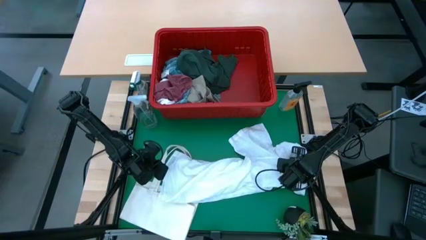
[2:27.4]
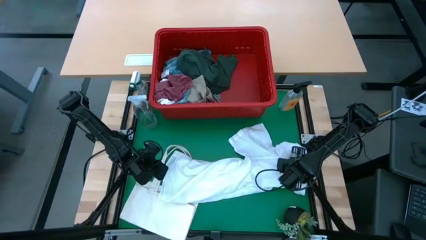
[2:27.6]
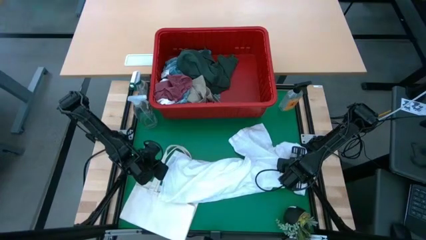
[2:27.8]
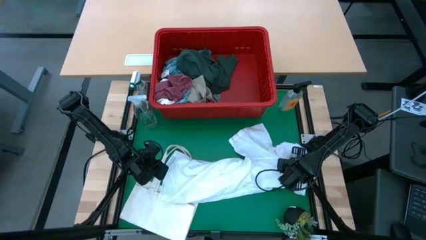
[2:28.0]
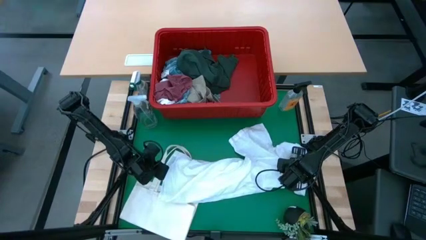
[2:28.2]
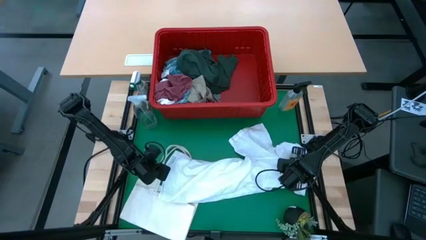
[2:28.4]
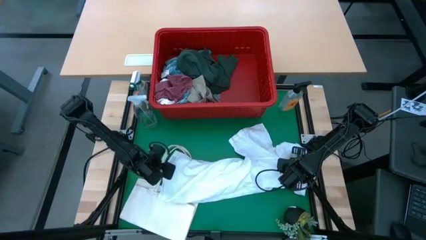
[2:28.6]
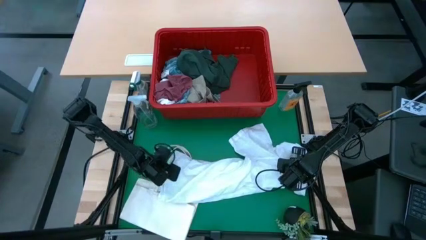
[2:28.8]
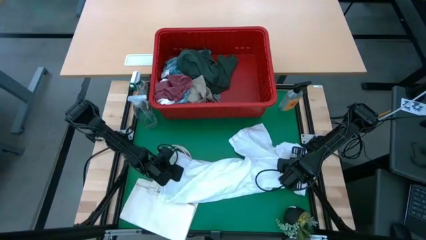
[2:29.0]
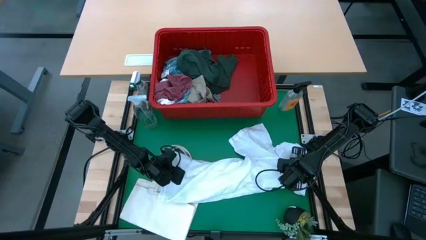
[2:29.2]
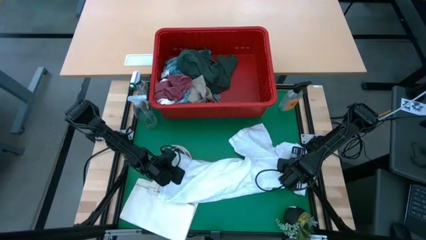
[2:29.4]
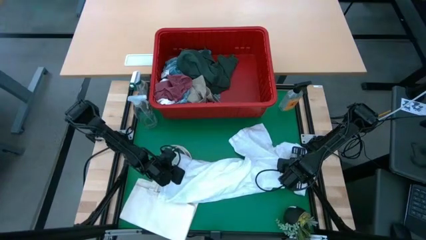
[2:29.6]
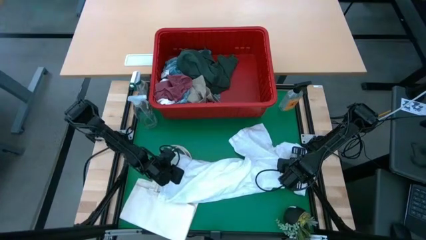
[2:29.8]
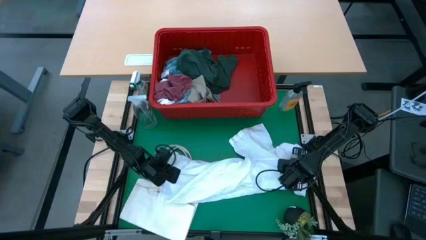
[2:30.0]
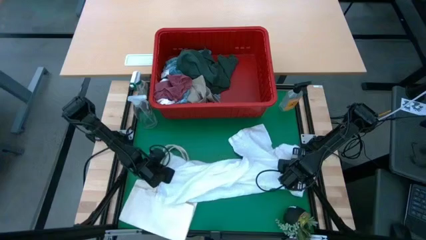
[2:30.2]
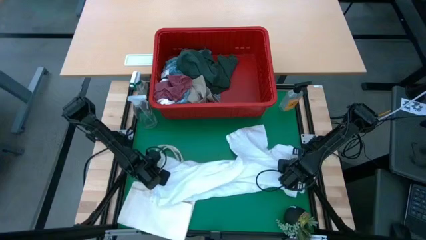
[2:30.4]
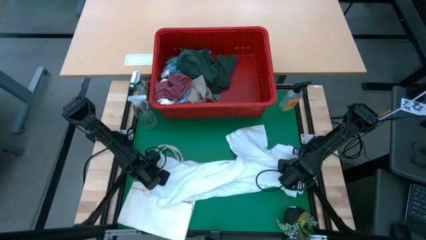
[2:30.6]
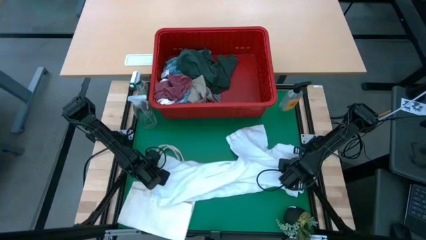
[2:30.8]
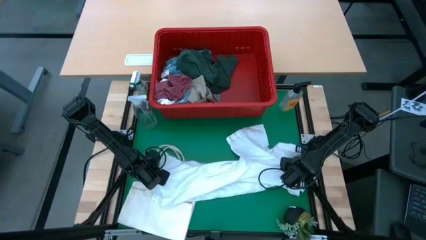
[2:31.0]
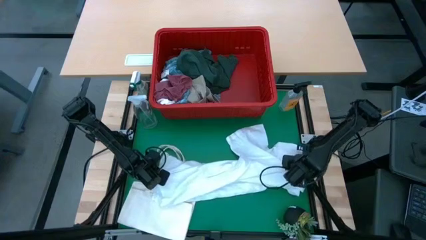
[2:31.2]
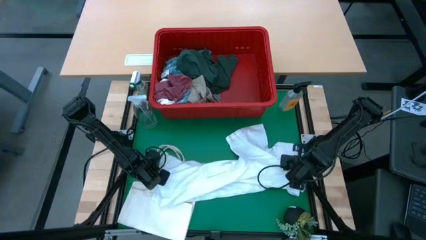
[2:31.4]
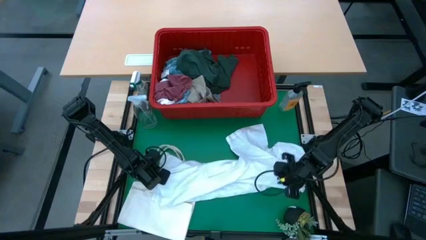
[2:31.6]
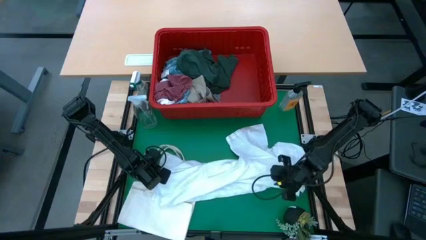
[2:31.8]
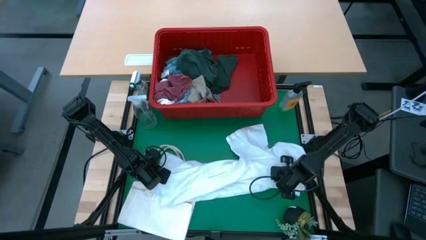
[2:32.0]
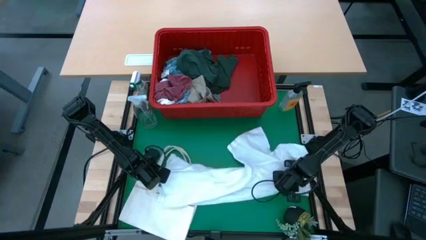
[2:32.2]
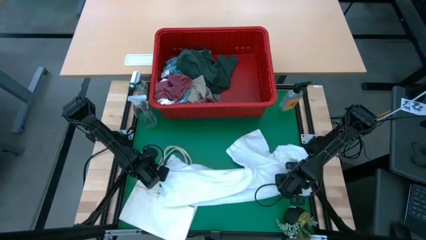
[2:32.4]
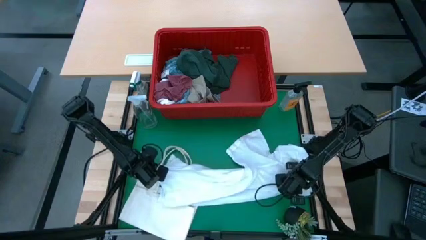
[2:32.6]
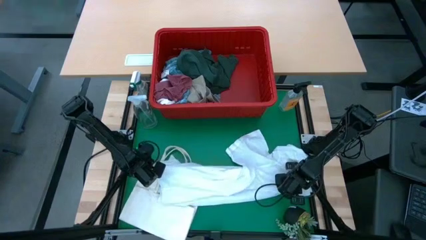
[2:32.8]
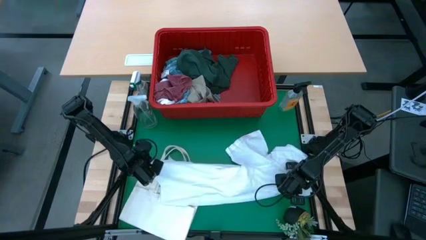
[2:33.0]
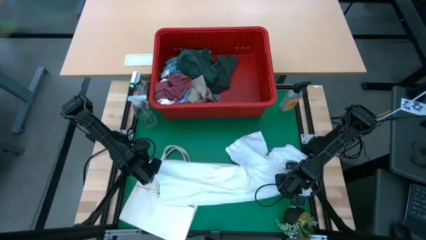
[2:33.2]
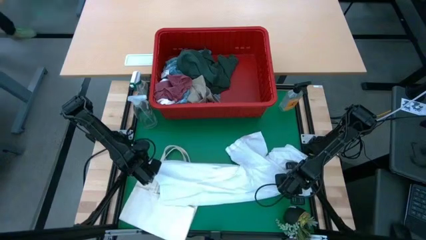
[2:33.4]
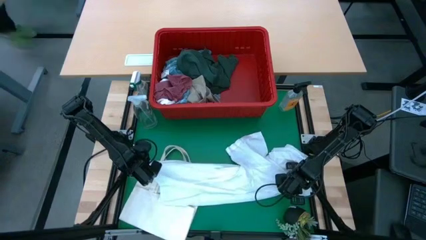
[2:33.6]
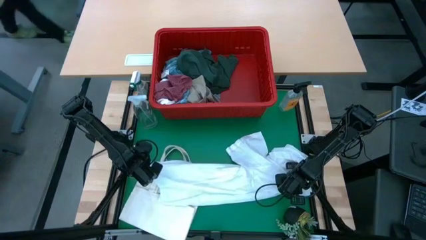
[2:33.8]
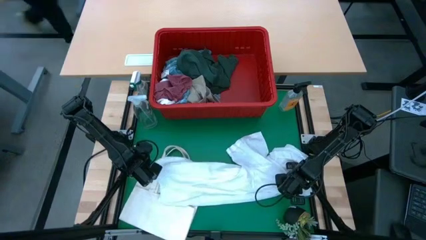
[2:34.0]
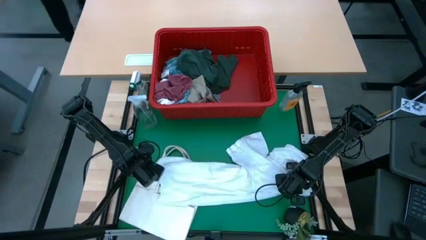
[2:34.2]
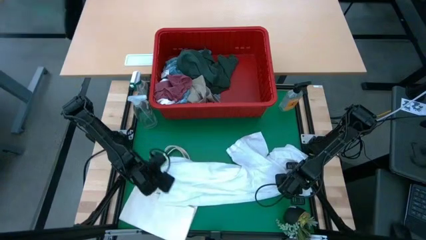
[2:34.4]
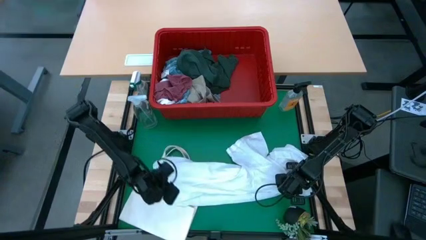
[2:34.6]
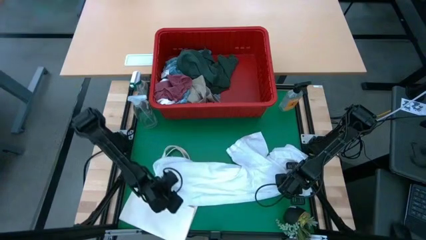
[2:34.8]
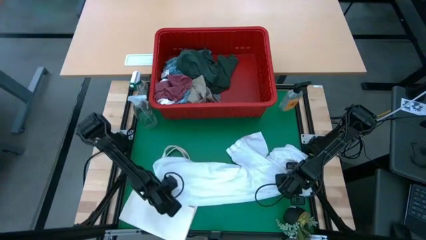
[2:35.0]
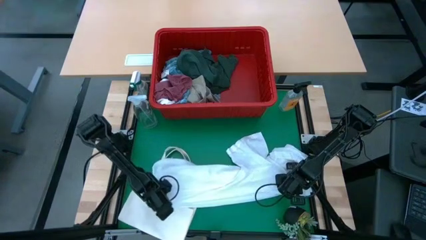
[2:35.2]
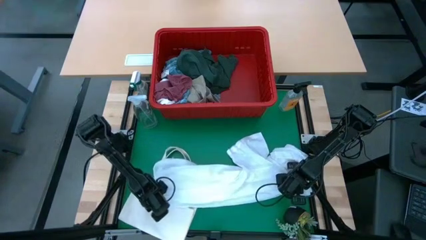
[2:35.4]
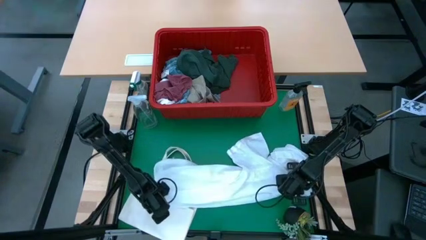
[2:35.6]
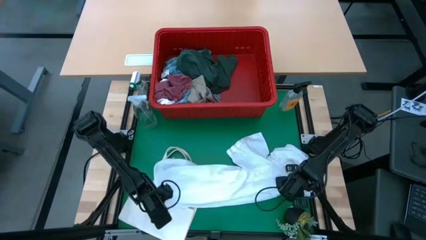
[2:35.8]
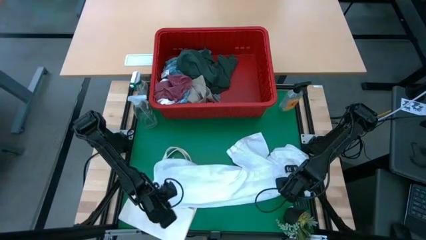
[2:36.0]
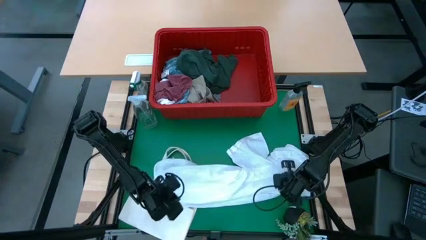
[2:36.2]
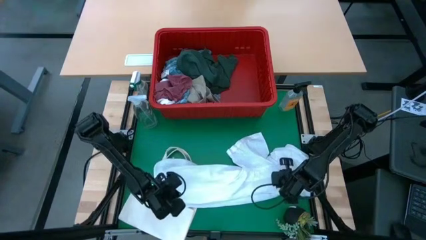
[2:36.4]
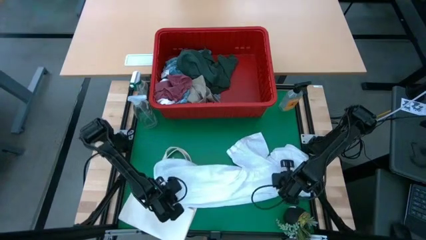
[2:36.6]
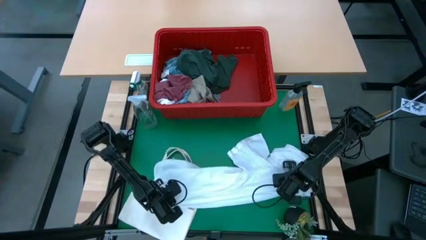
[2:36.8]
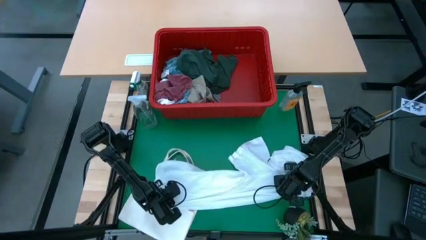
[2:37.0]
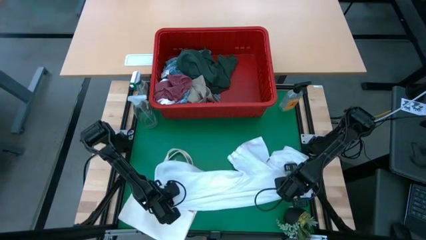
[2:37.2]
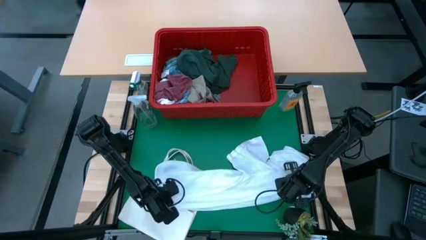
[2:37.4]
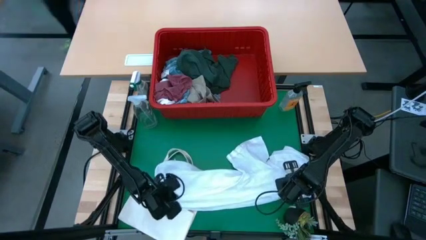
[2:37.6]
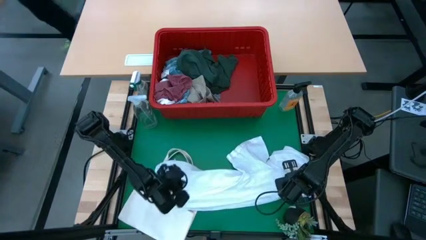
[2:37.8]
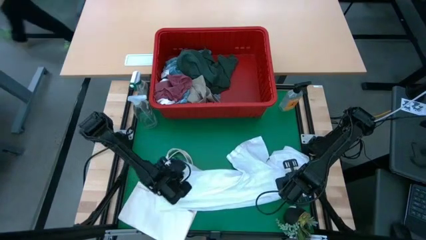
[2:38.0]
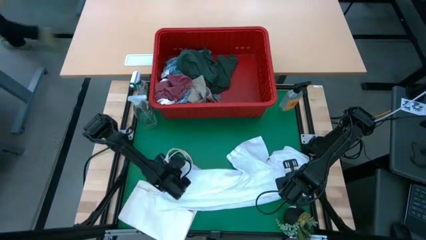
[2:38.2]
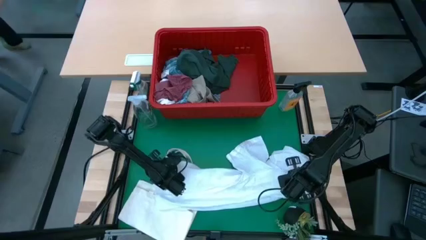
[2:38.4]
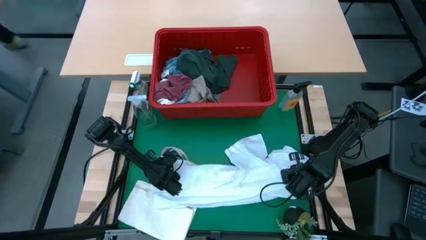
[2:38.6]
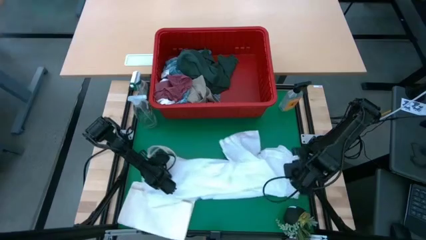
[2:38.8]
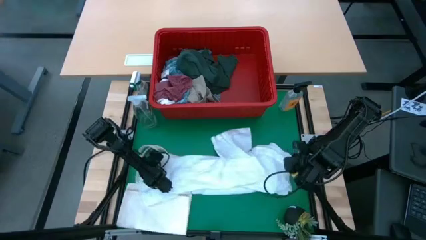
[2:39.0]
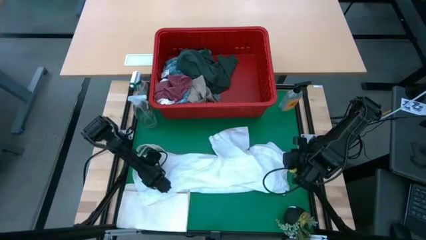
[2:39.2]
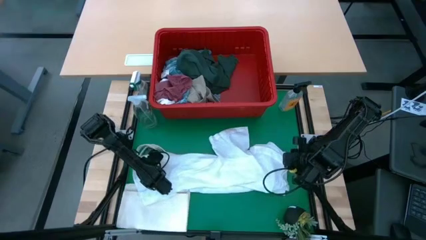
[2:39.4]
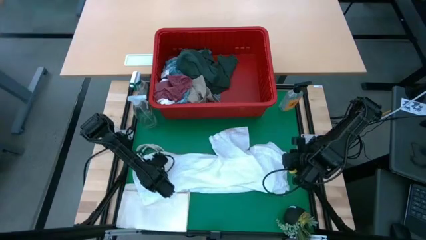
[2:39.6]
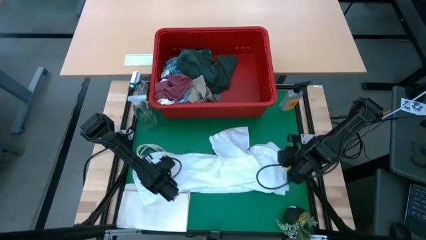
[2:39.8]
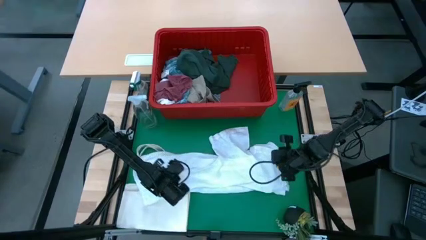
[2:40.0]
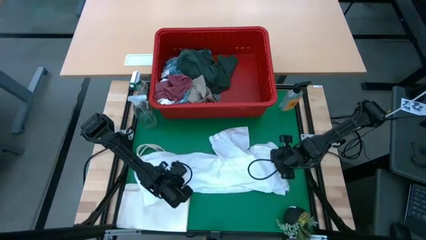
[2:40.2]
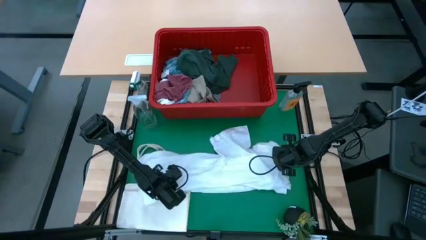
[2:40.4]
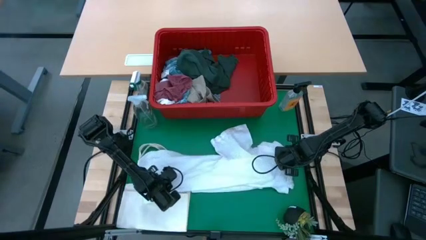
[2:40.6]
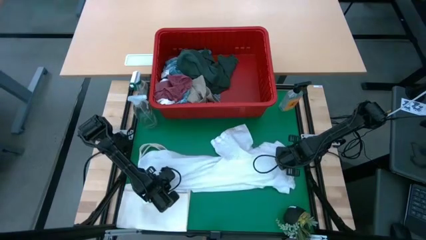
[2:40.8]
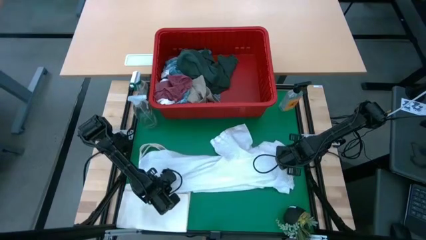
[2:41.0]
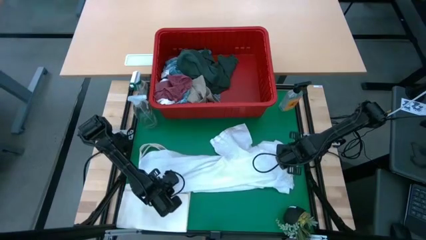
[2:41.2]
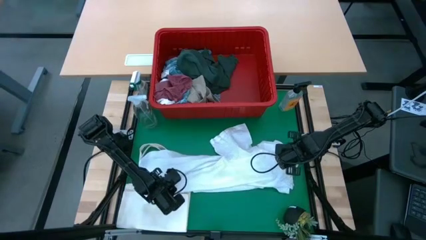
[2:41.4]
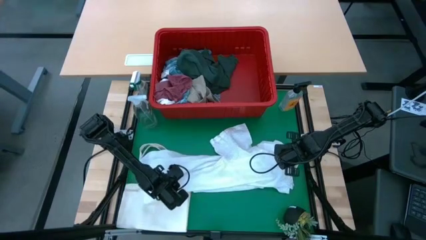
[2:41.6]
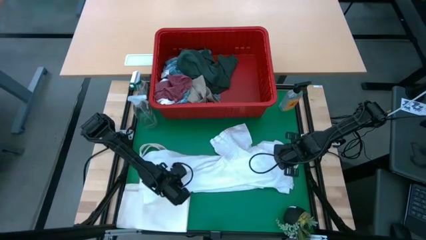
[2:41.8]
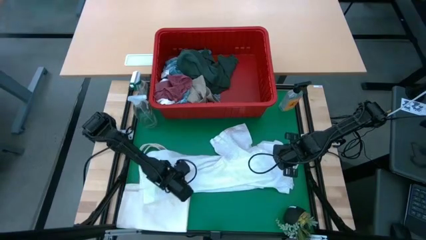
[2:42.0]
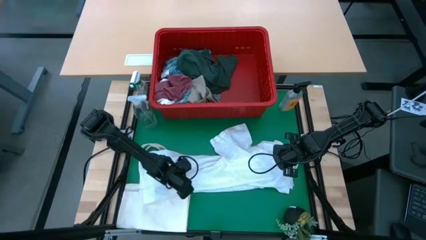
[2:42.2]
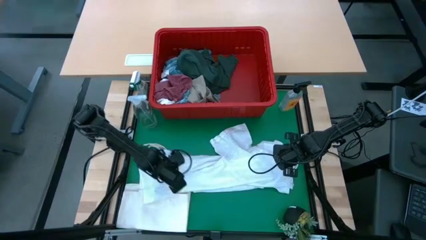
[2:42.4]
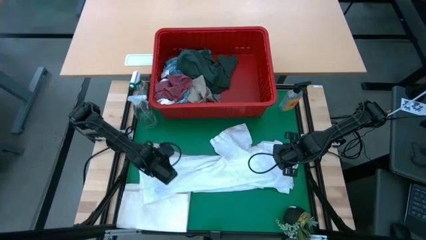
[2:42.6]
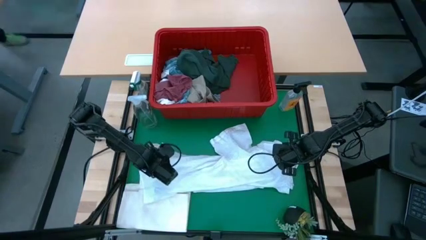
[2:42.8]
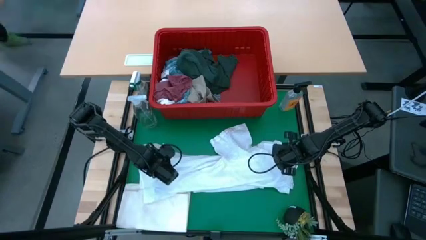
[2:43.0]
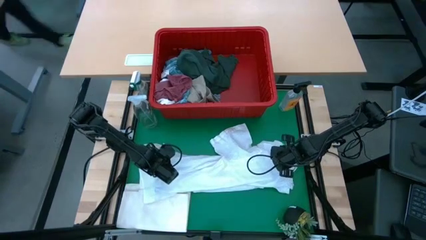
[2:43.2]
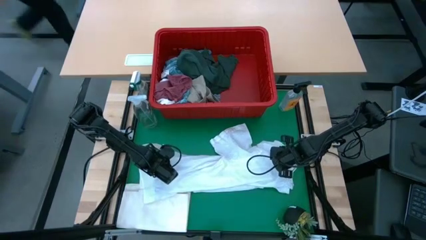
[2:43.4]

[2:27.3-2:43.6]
Task: Fold Laundry from Bin
Fold the white polo shirt
